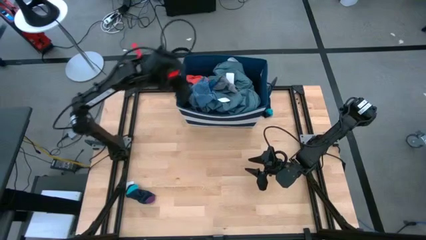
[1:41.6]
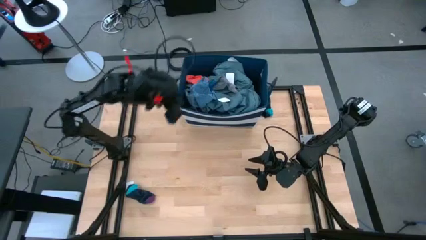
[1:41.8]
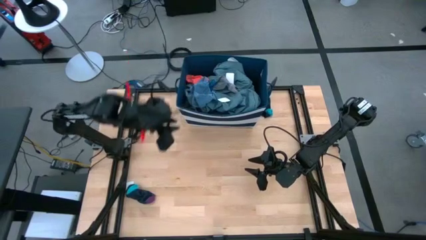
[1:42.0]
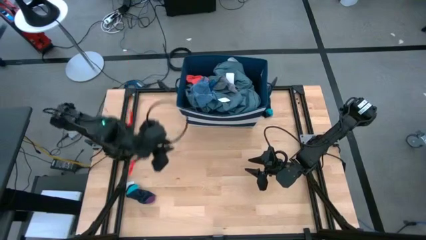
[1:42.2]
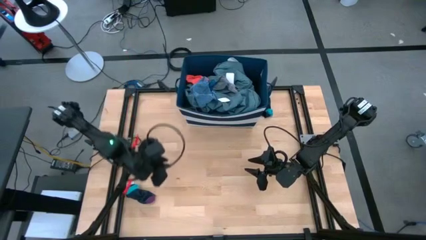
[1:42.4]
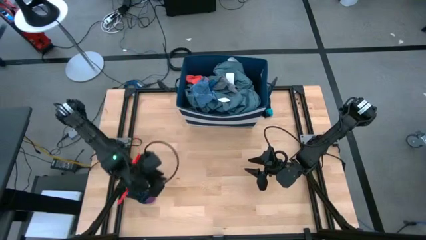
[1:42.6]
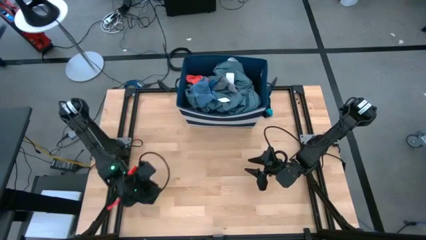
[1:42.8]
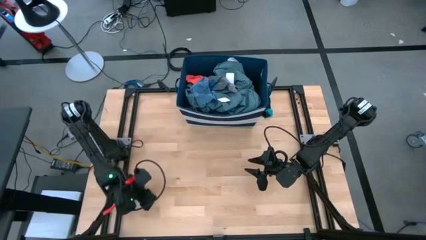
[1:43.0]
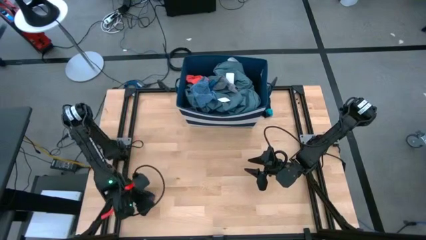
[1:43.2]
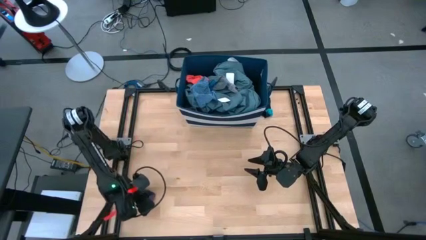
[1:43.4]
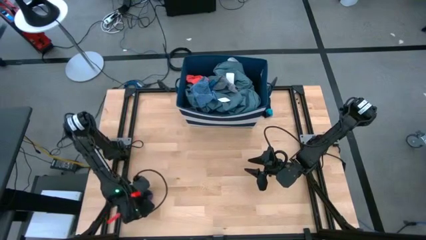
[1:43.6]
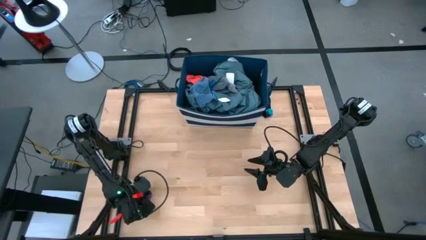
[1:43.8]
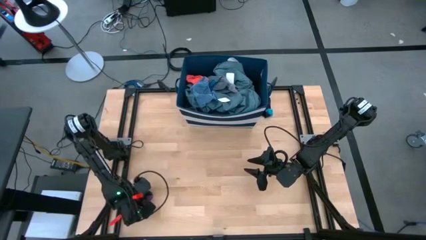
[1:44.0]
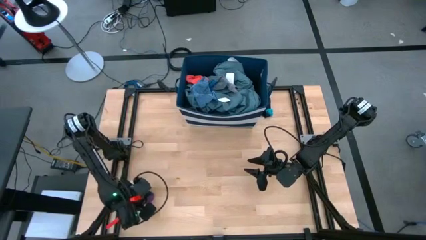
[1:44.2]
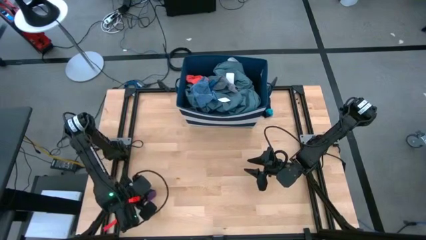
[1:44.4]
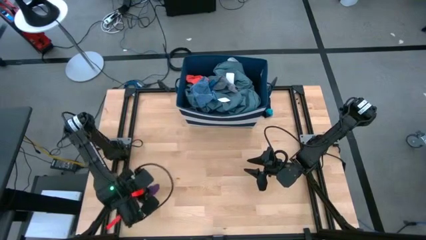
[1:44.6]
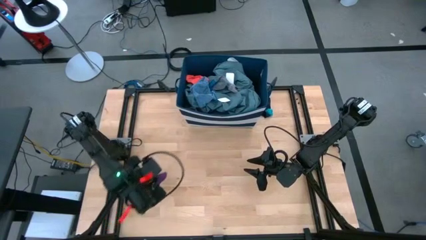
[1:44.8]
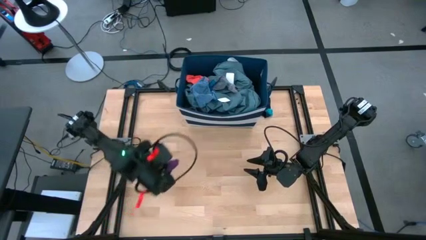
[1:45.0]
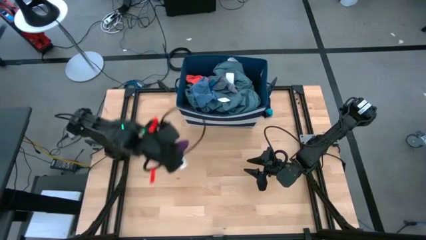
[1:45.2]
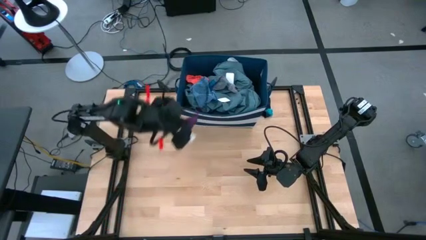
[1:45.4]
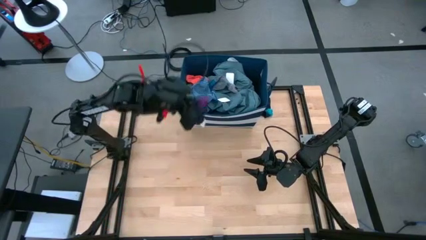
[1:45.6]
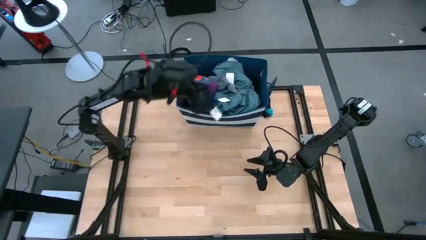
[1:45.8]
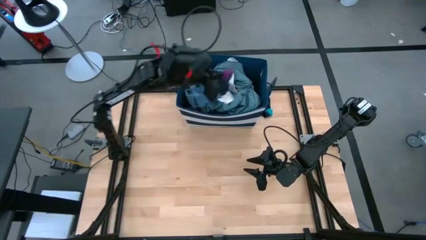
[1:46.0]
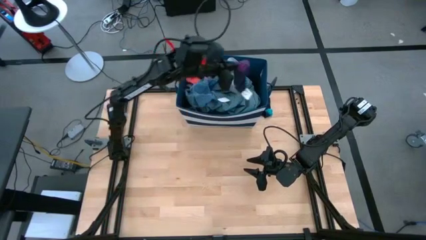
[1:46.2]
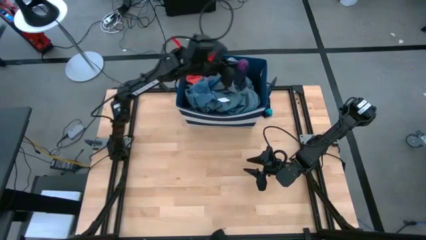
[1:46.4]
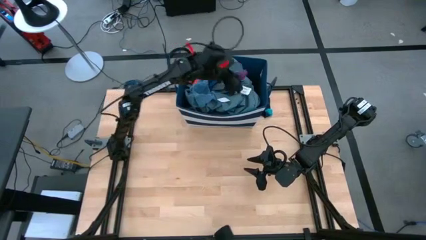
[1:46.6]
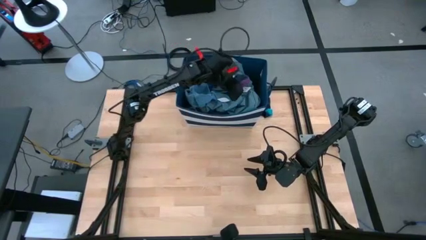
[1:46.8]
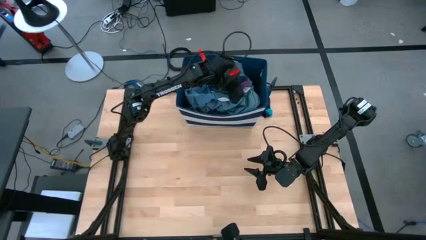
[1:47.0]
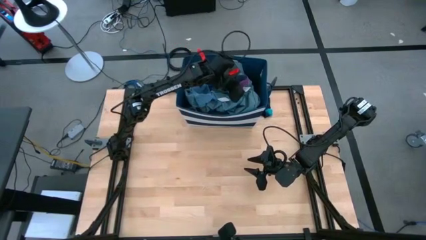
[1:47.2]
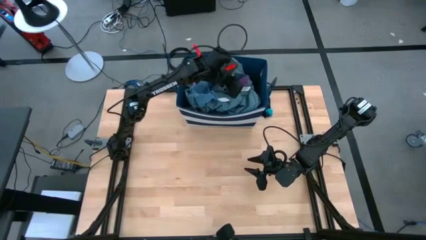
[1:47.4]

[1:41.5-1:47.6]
Task: Sort clothes
Put the bottom dark blue sock into the laundry organizer

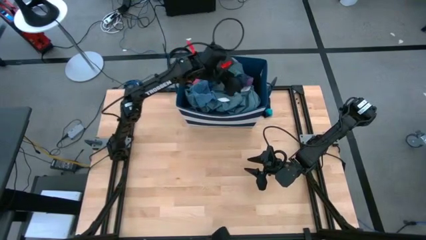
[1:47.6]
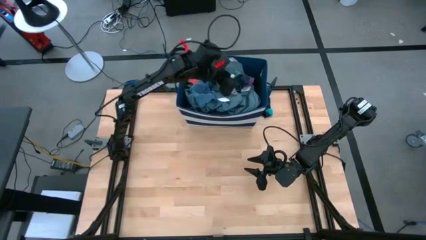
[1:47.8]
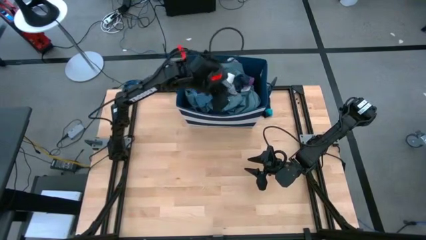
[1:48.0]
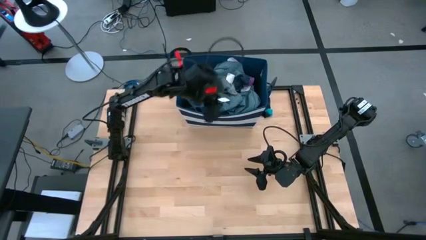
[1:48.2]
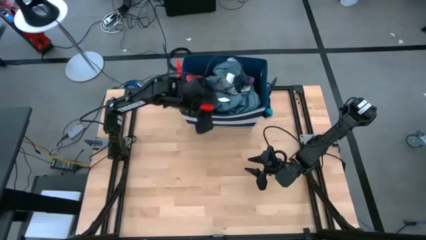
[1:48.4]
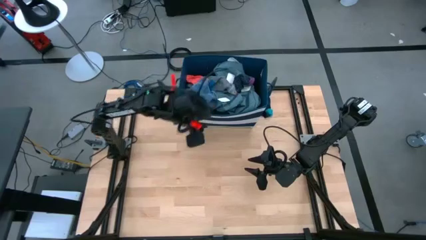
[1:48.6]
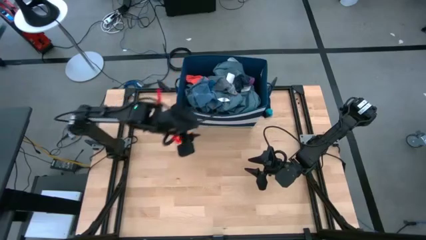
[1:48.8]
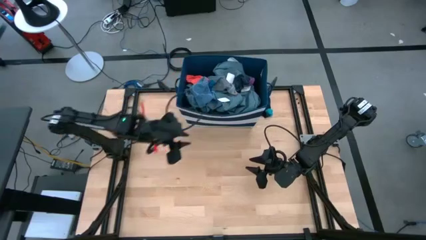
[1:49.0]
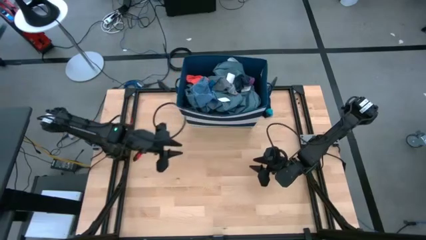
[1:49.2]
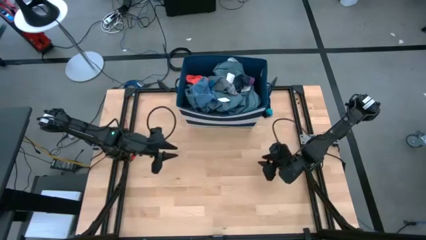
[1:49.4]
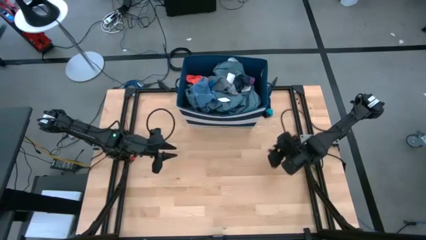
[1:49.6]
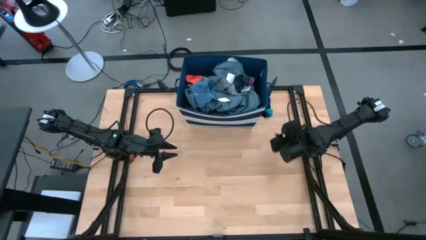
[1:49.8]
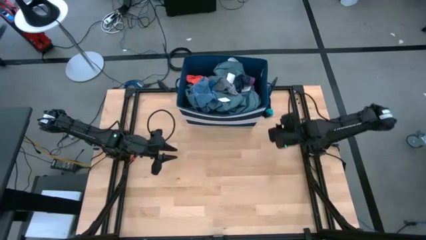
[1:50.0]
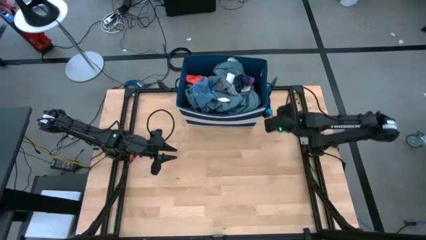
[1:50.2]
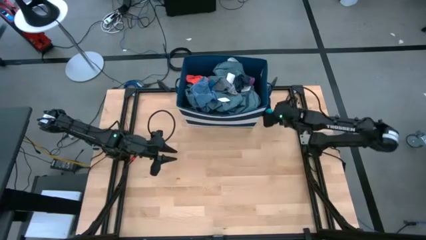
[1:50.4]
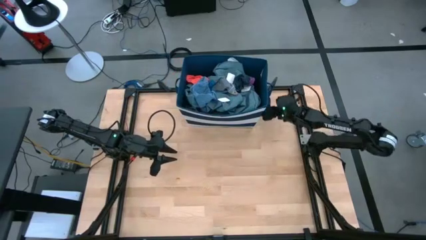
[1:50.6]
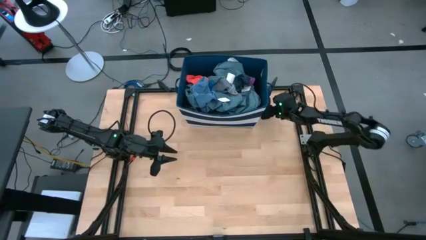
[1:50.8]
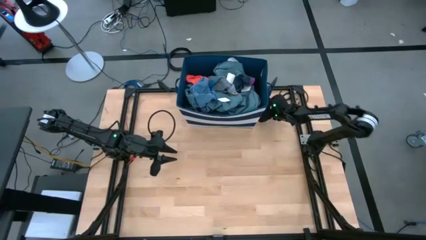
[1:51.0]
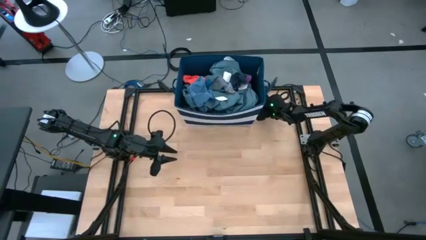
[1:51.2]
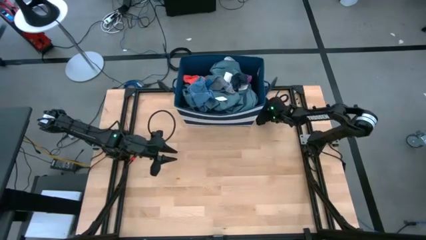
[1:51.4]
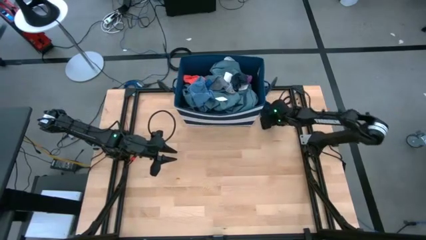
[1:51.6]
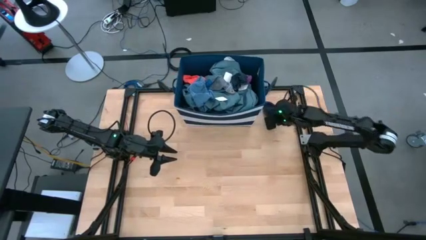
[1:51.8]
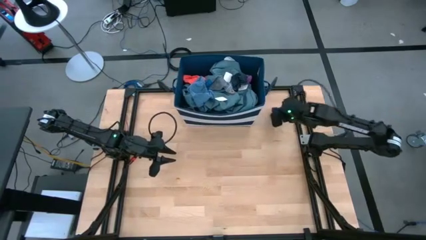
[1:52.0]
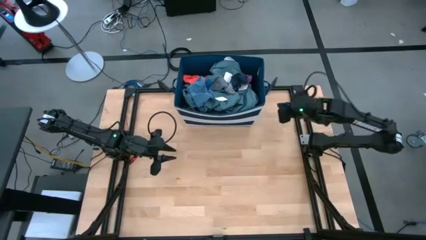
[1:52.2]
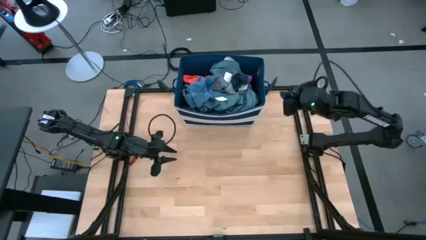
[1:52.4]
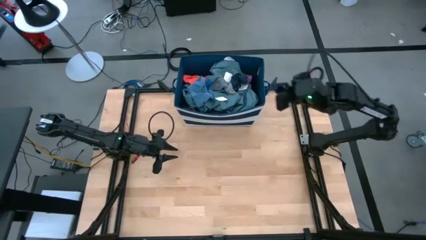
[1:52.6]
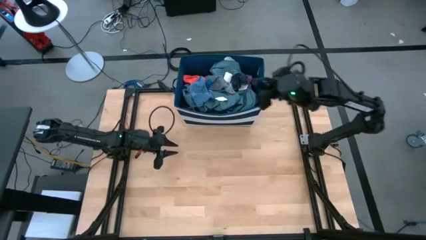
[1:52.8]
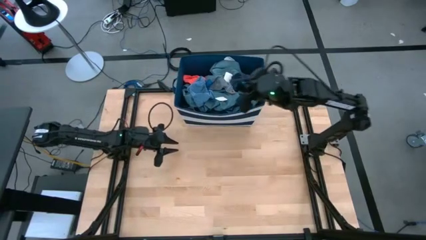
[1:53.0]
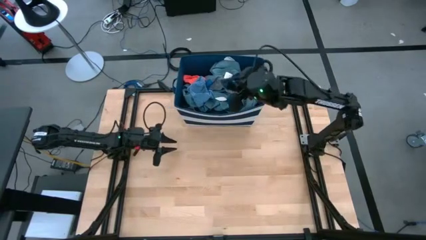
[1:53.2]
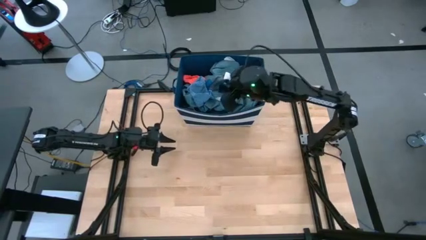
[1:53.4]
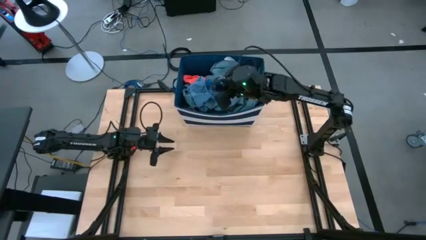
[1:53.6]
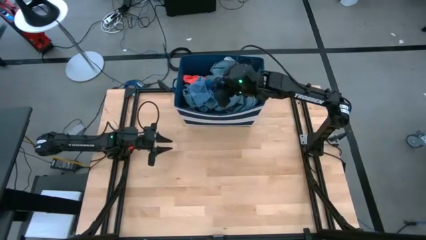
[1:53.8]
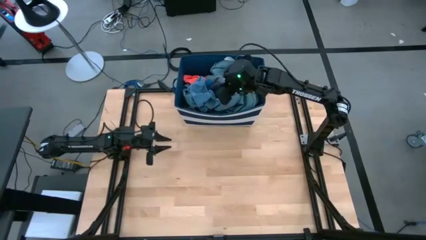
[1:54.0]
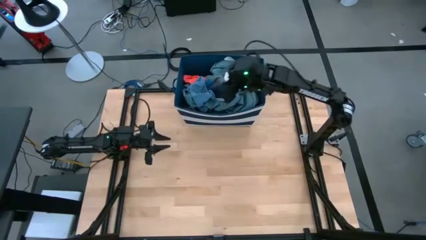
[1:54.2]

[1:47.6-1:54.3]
Put the dark blue sock into the laundry organizer

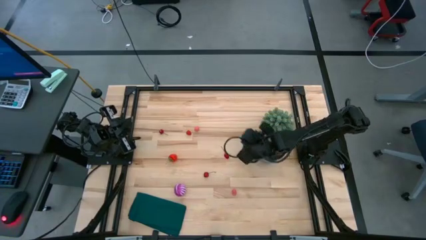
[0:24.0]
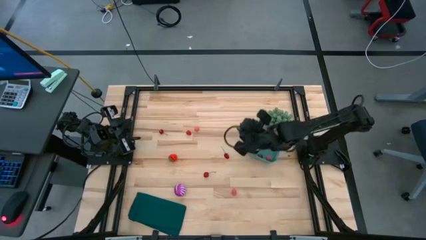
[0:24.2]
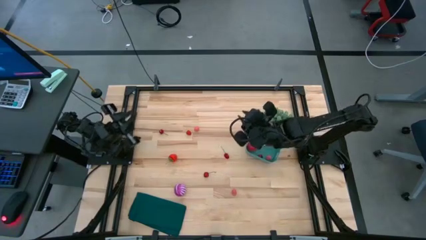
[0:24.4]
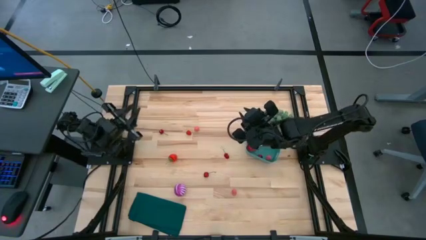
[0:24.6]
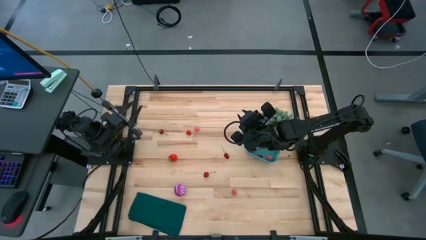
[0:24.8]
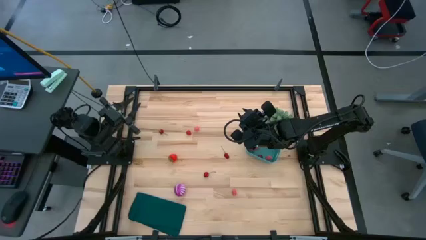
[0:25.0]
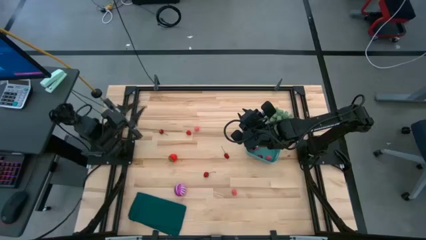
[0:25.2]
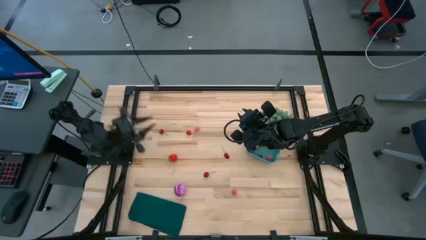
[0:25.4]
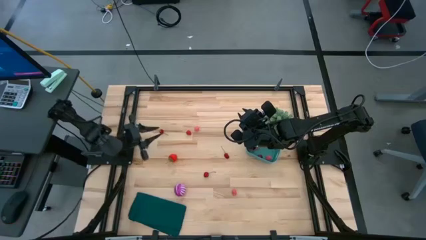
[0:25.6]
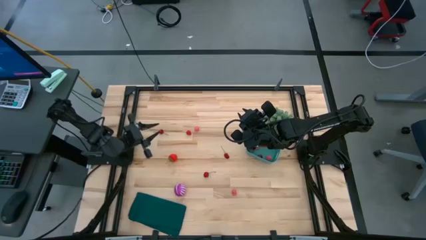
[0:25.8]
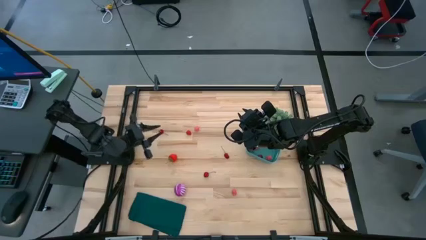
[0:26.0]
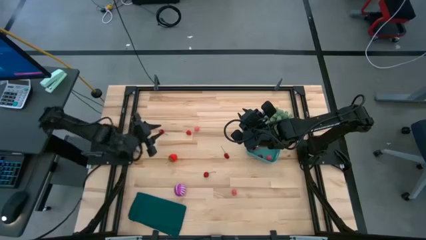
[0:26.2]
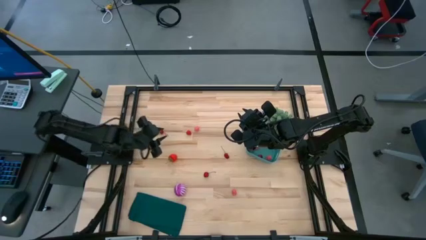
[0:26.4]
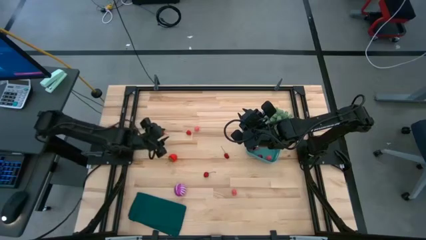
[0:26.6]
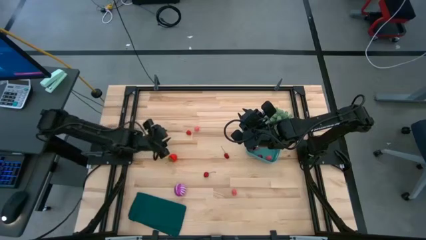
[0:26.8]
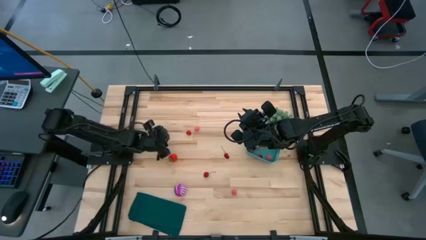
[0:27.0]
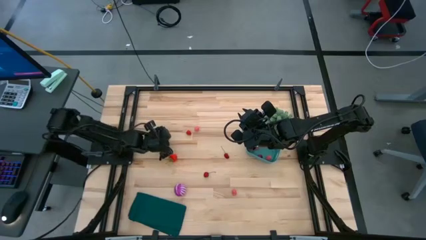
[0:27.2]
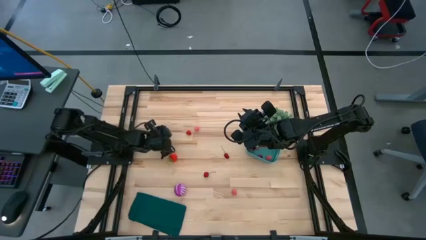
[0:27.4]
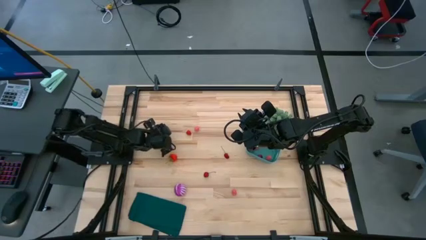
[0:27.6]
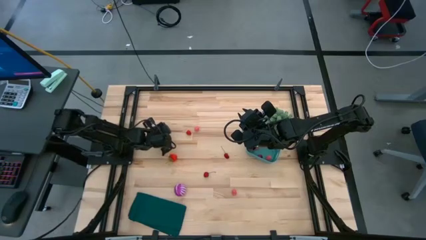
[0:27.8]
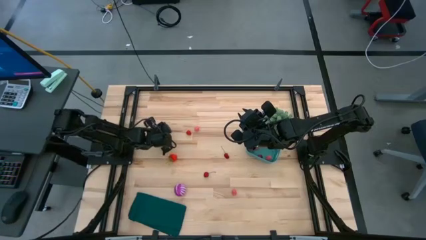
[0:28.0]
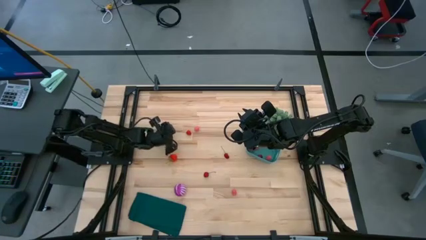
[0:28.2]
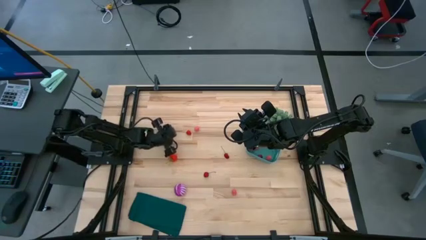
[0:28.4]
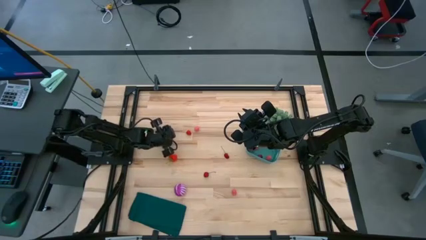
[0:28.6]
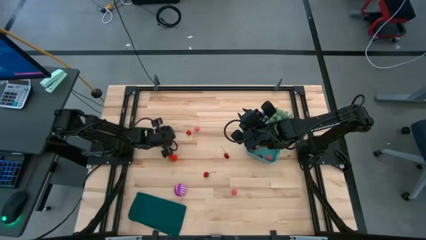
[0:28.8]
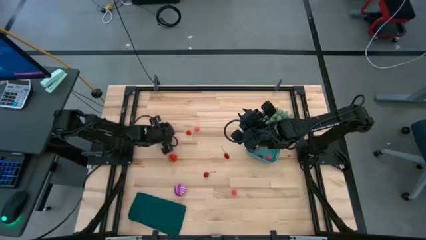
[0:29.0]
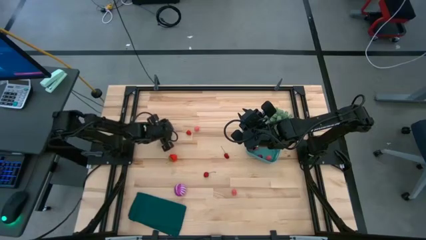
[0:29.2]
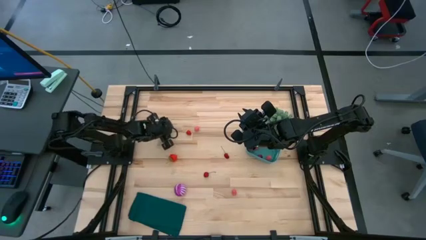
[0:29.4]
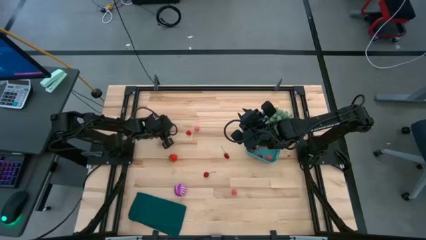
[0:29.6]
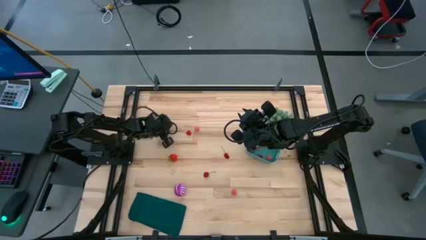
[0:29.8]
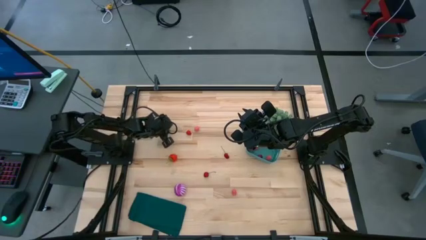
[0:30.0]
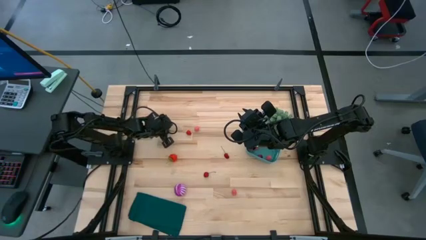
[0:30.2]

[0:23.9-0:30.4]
Task: Pick and placing Produce into tupperware
Put the cherry into the green bin
